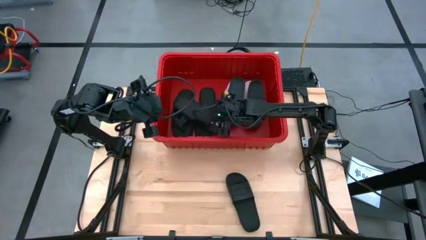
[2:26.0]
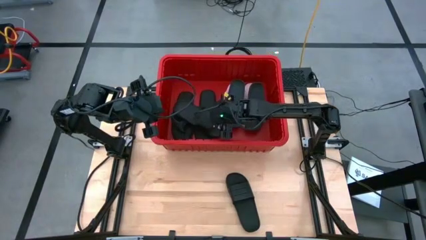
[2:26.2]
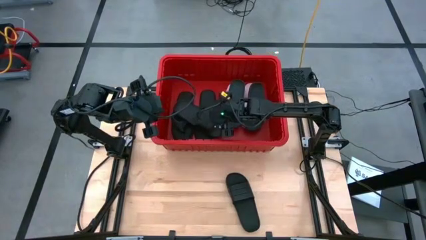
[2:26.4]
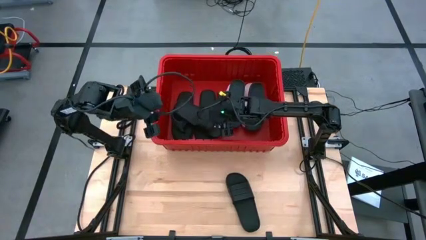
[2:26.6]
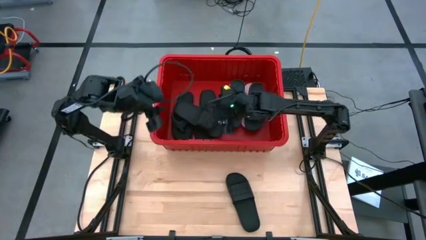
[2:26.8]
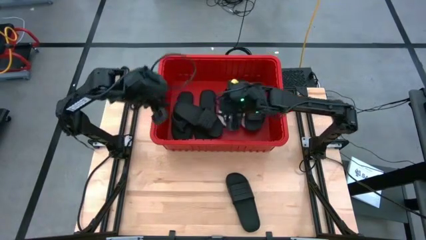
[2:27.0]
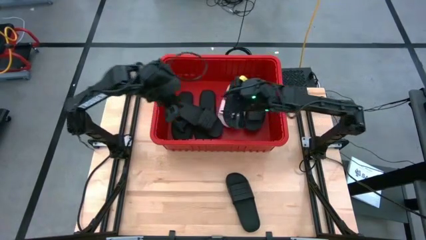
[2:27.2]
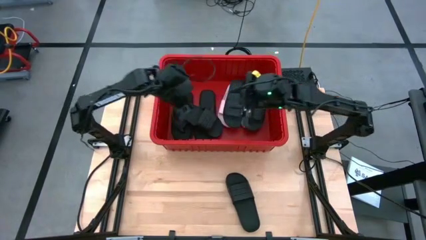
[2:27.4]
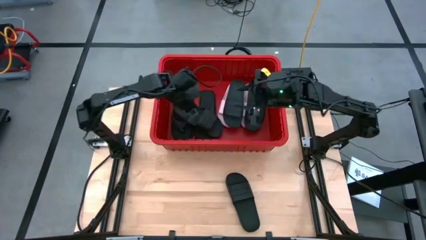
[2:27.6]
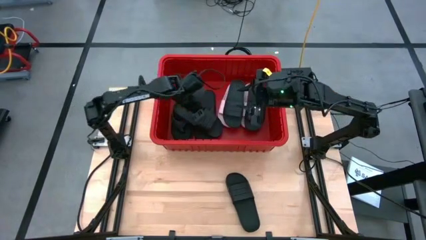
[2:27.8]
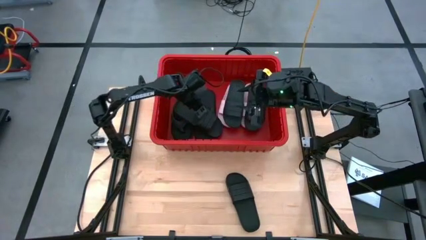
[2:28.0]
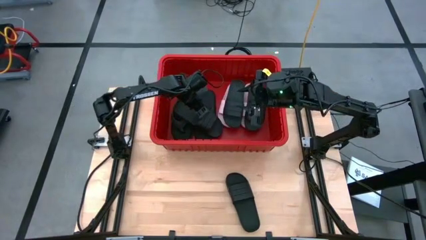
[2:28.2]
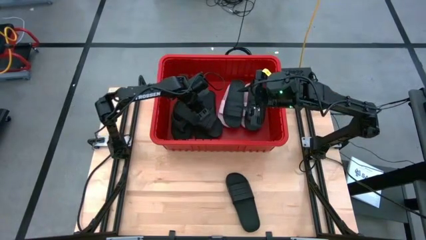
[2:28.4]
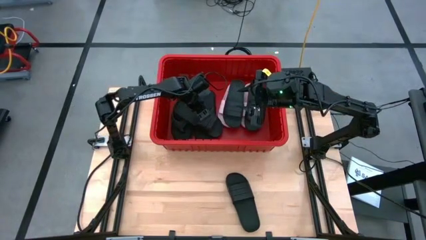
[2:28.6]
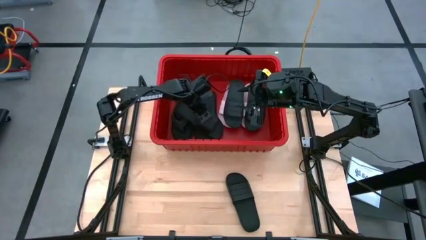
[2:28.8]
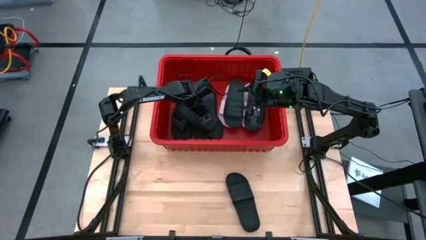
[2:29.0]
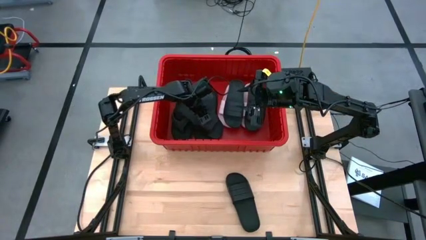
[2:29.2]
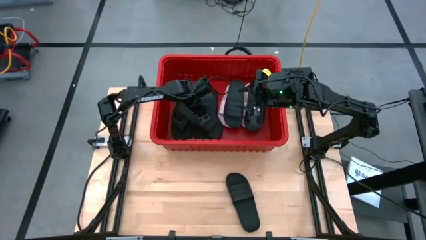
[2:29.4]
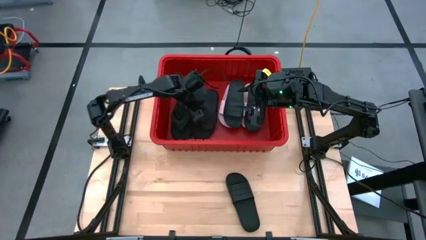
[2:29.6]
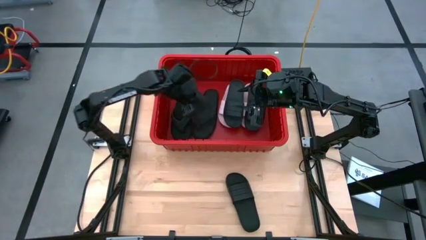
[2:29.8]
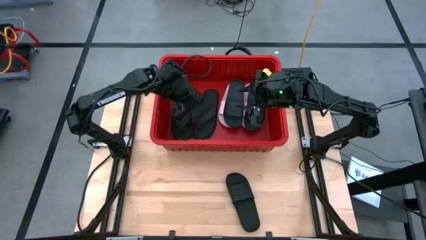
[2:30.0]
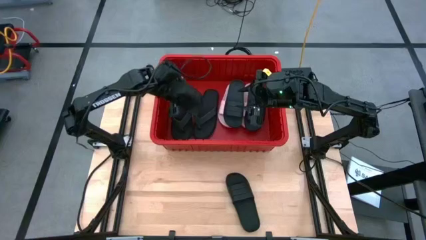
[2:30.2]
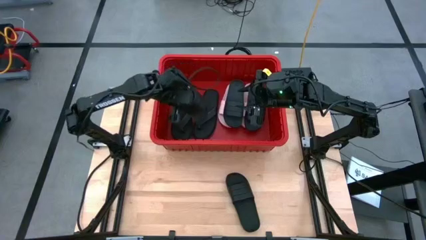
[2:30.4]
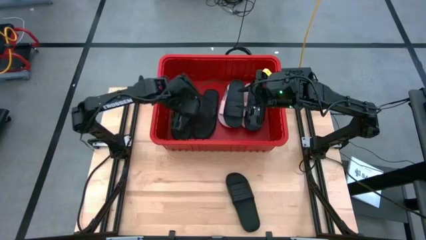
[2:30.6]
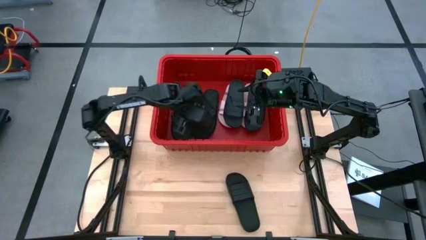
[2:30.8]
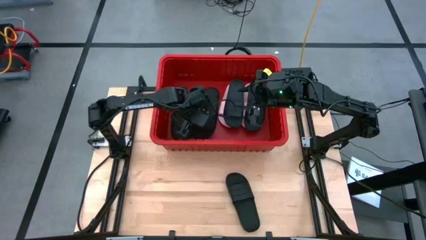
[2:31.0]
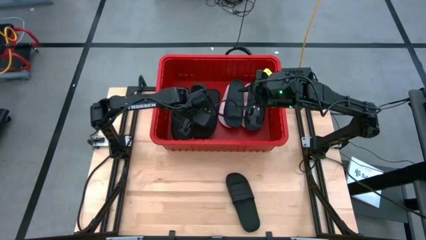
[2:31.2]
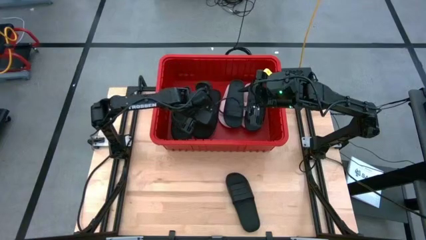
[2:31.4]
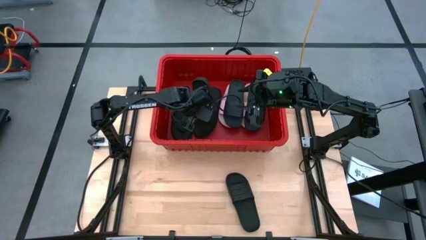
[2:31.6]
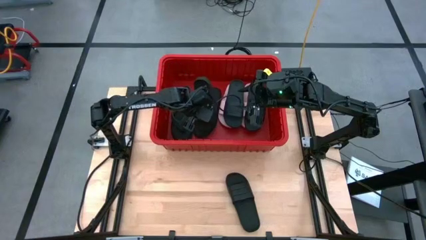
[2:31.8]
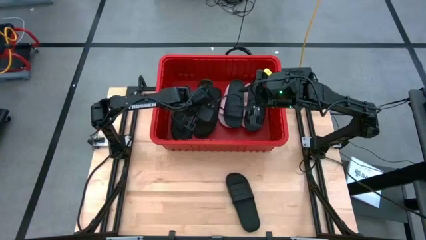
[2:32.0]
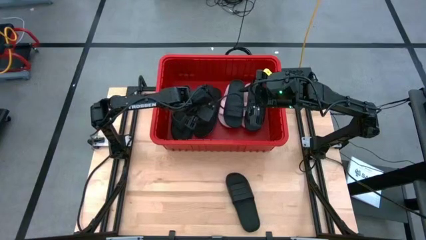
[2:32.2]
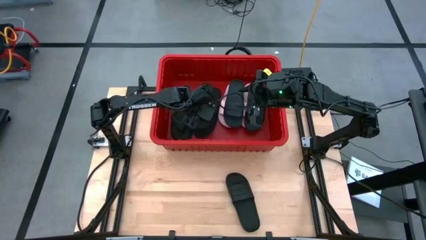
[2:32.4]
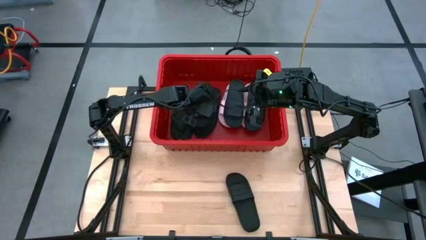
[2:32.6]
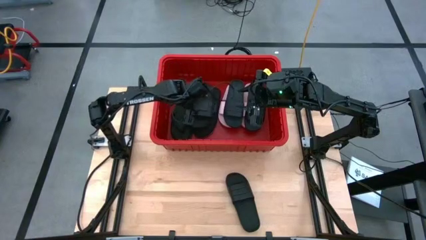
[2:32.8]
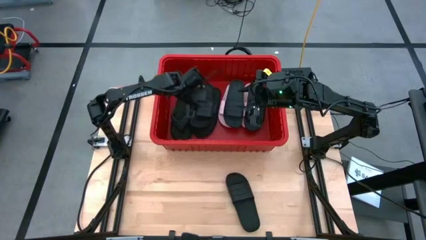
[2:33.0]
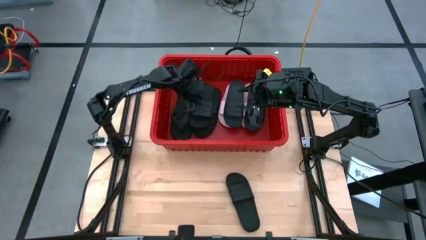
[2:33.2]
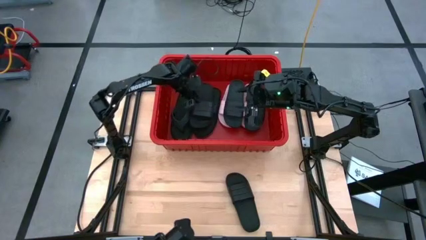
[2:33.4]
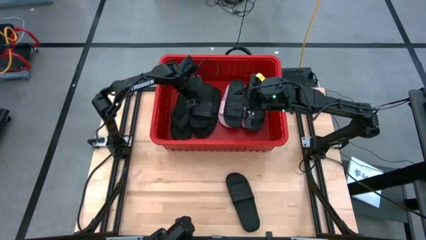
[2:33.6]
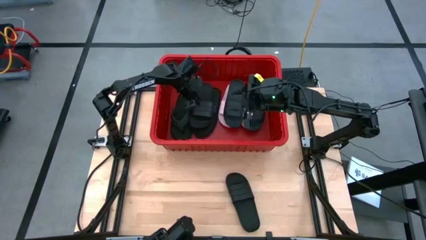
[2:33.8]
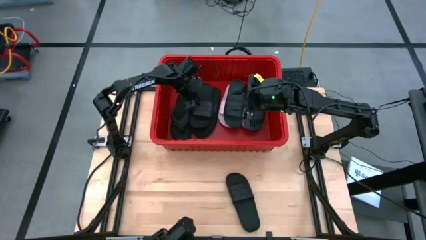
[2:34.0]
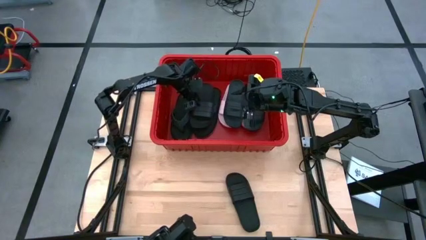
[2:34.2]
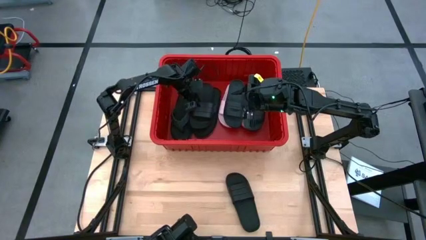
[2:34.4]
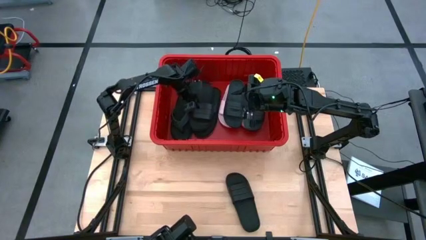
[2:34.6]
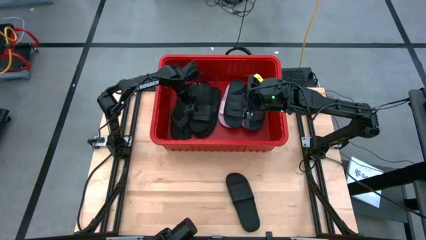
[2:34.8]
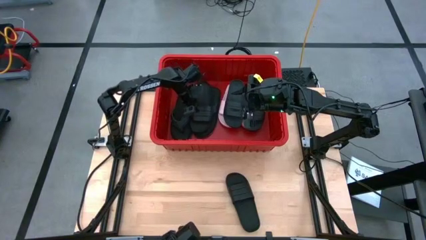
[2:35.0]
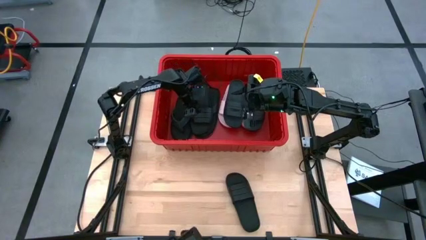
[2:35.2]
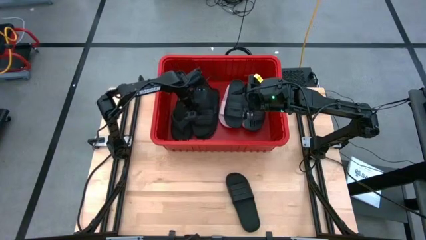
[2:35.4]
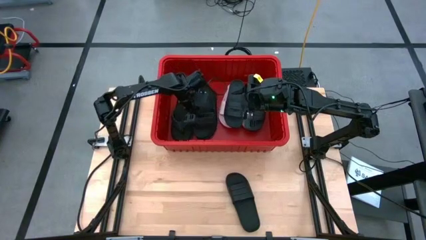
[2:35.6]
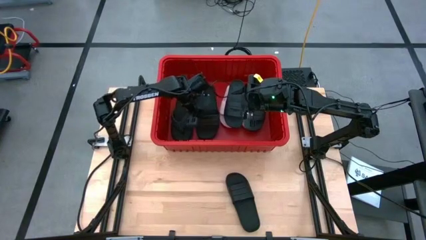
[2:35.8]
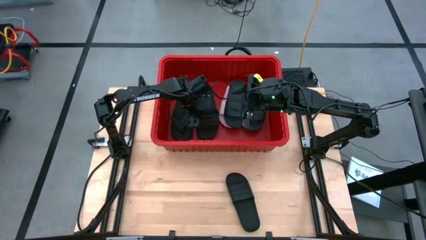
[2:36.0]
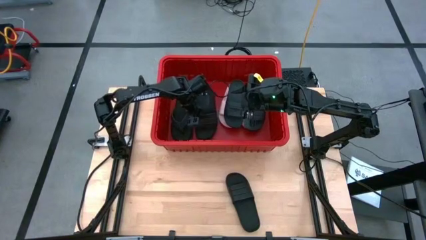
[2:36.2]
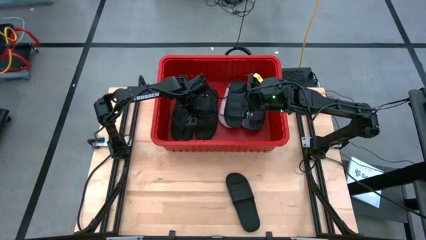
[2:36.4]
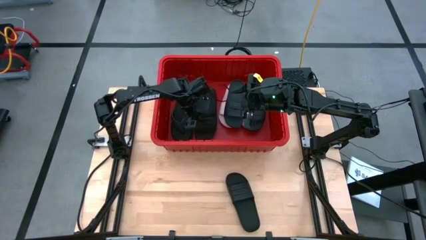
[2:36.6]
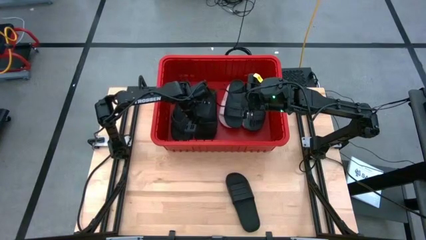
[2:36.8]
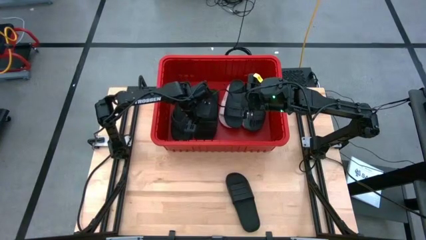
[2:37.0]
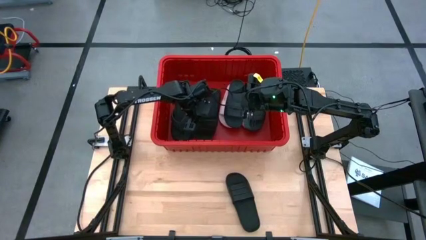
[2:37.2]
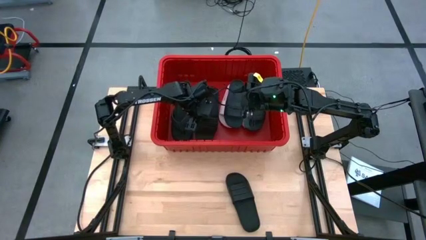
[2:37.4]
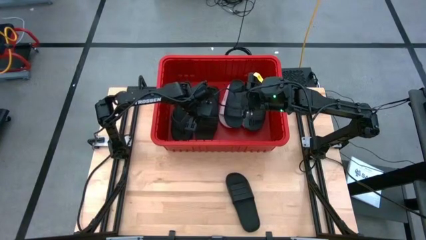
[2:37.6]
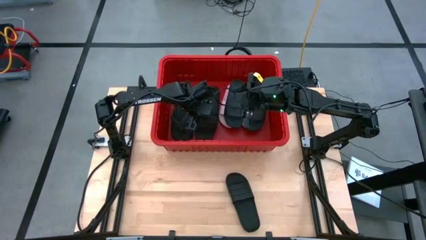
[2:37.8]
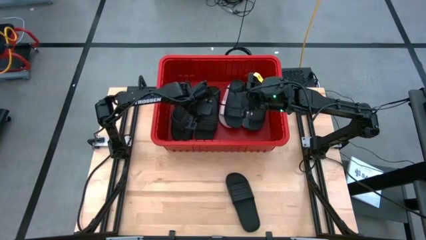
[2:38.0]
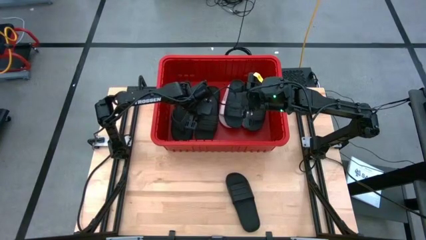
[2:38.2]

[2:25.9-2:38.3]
Task: Pick and place slides into bin
Put the black slide into the red bin

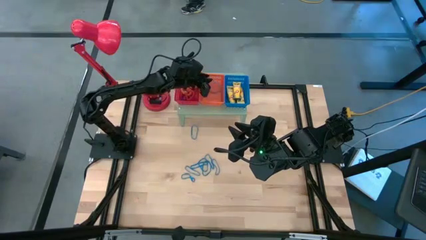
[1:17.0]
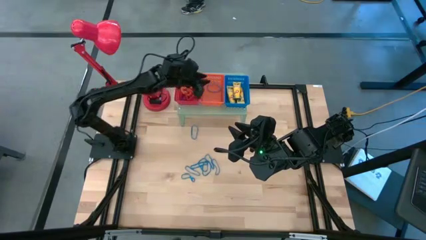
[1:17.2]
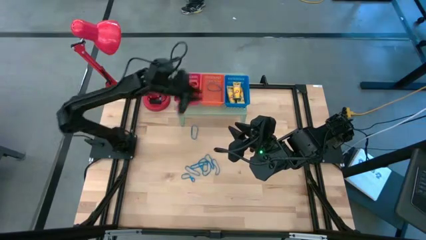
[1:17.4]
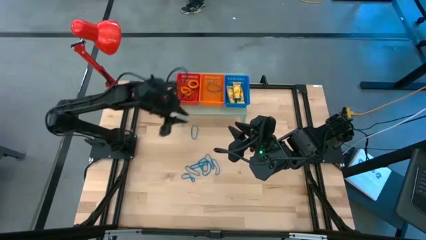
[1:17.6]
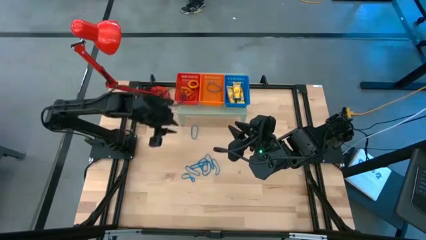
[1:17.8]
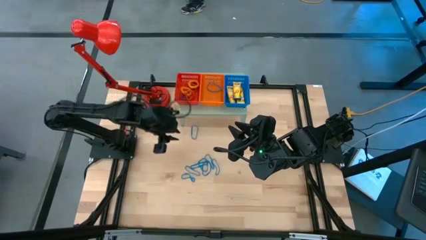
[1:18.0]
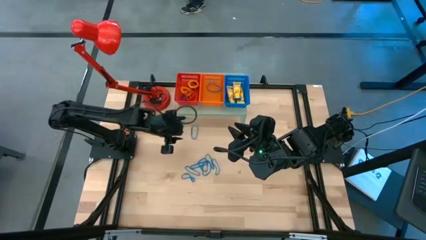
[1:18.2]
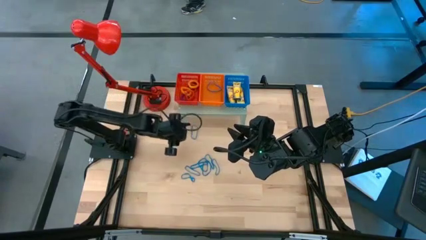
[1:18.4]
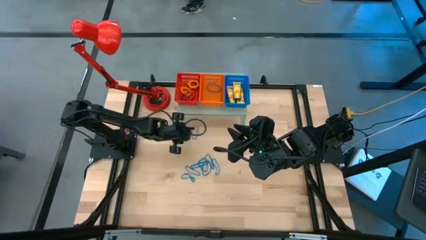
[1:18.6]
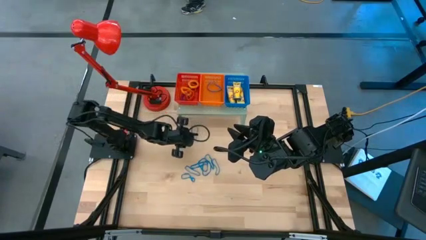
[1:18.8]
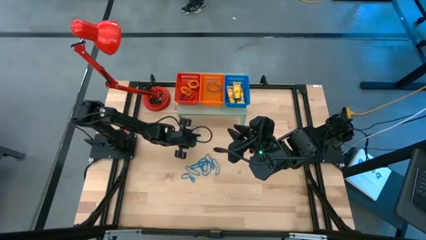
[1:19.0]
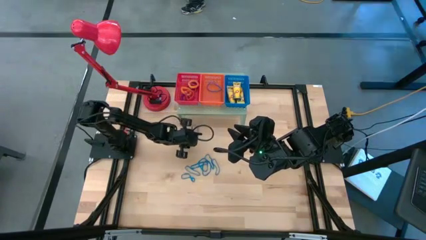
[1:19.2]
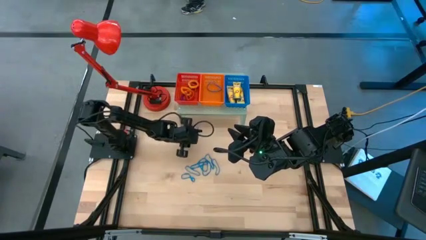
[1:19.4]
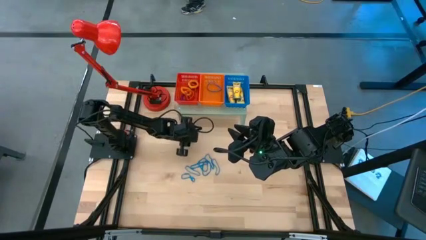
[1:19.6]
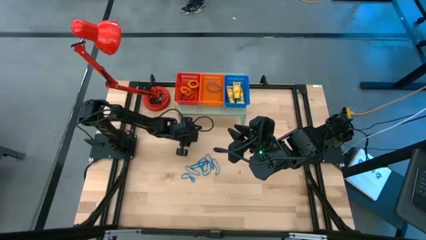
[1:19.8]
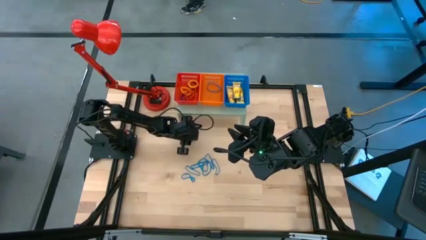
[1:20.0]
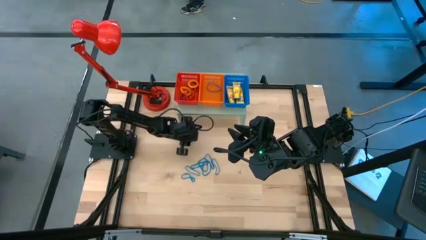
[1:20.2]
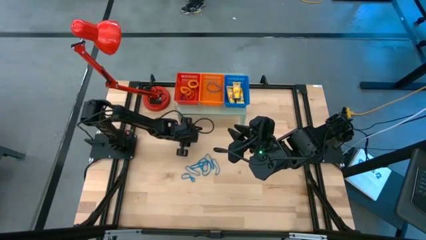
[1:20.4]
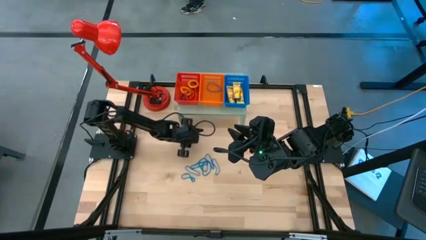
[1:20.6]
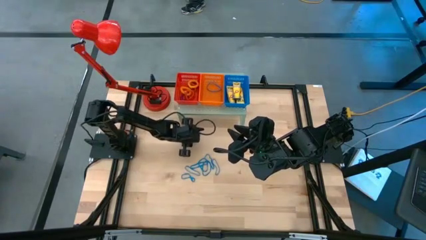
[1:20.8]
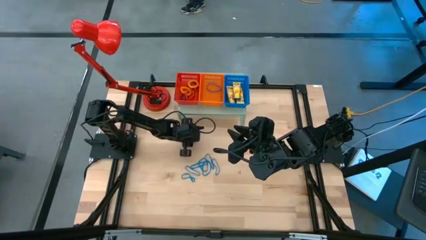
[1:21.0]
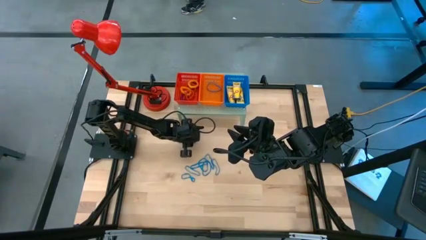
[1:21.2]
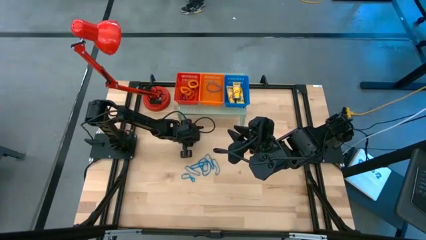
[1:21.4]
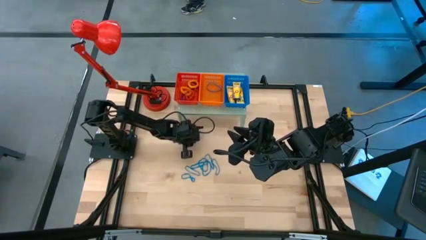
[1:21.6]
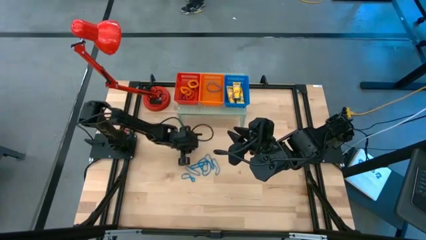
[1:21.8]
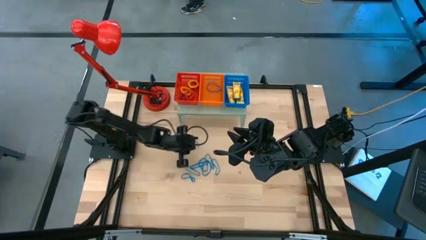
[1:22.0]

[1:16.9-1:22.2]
Task: Pick & Place Office Desk Supplies
Put the blue rubber band into the orange bin on the shelf
